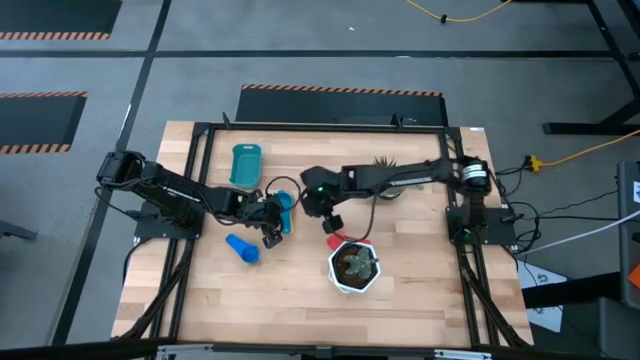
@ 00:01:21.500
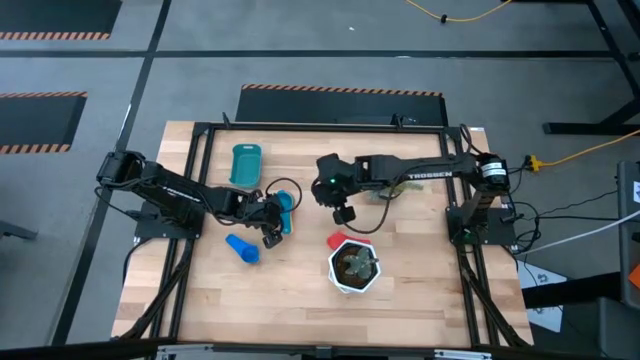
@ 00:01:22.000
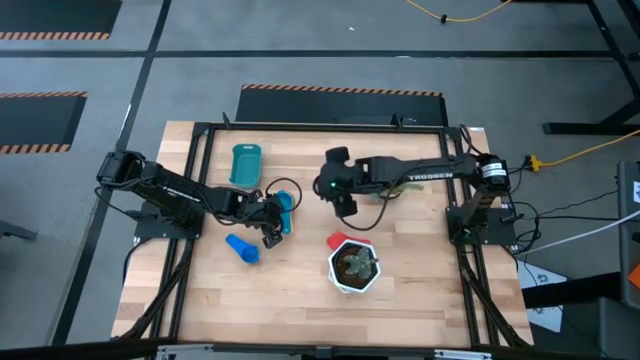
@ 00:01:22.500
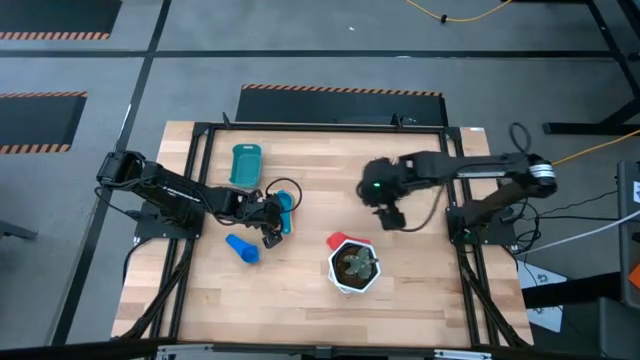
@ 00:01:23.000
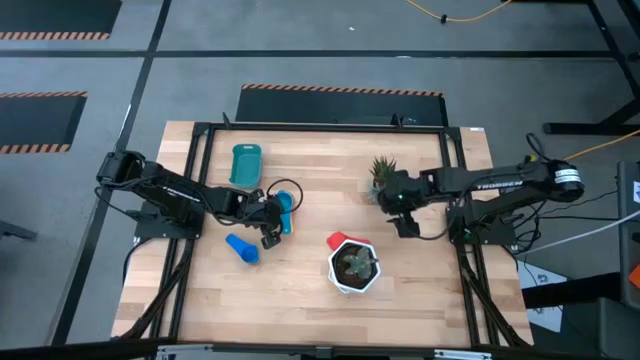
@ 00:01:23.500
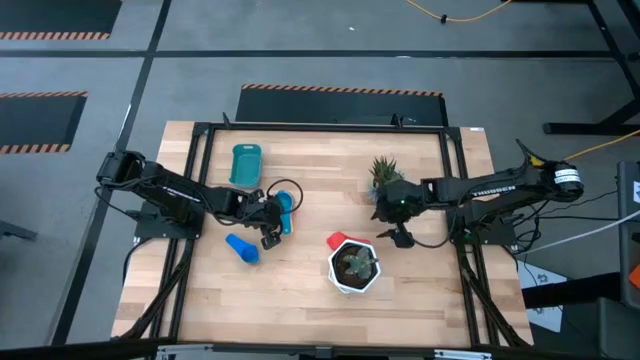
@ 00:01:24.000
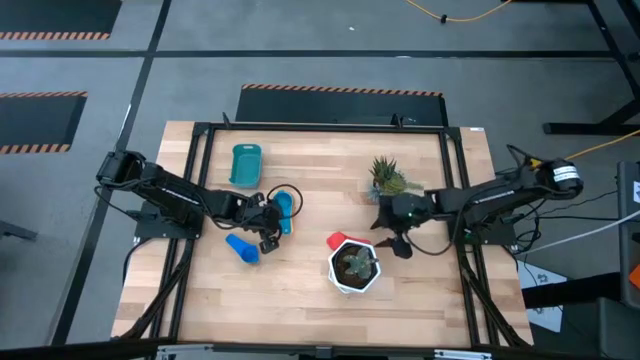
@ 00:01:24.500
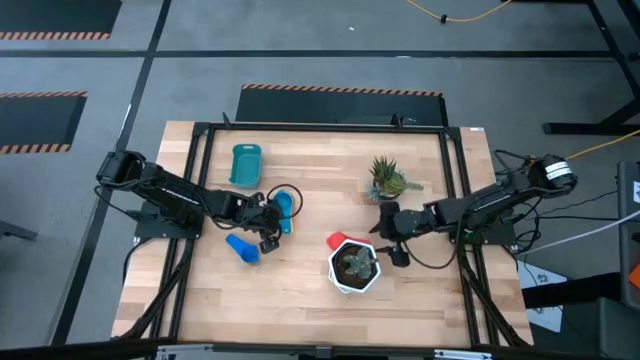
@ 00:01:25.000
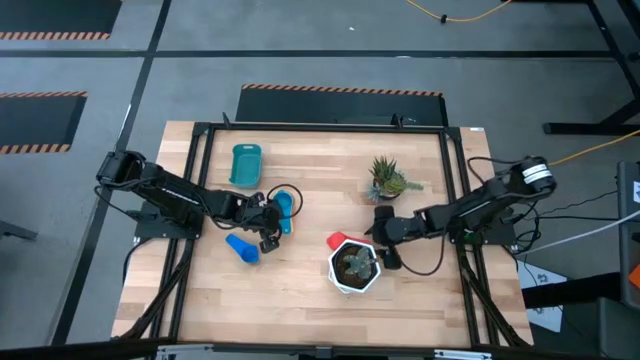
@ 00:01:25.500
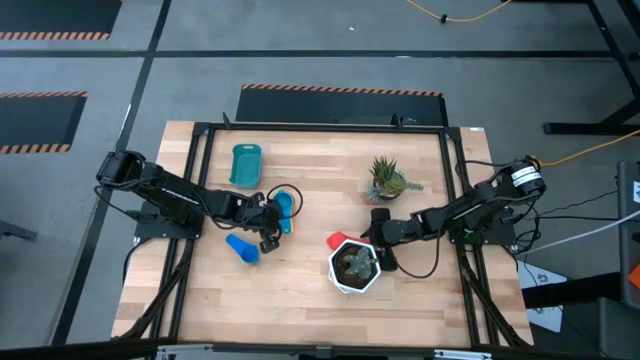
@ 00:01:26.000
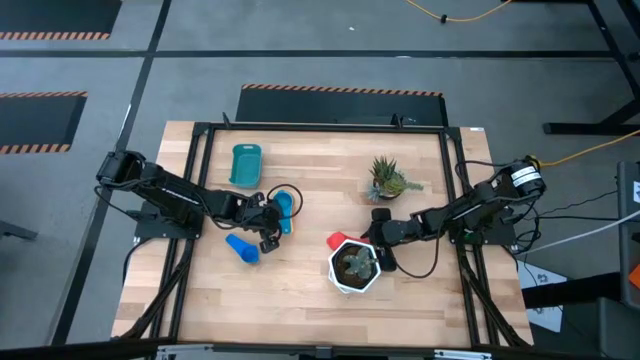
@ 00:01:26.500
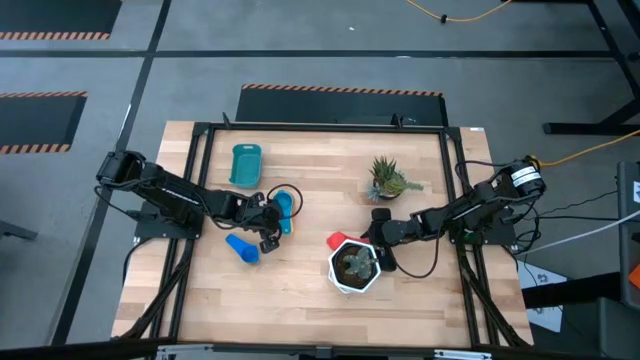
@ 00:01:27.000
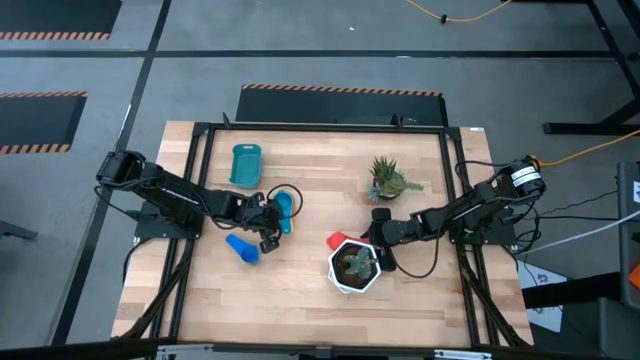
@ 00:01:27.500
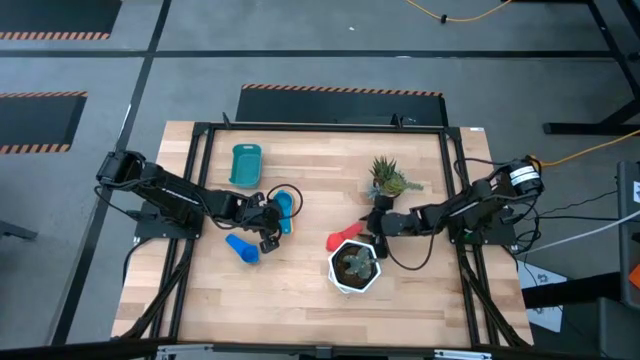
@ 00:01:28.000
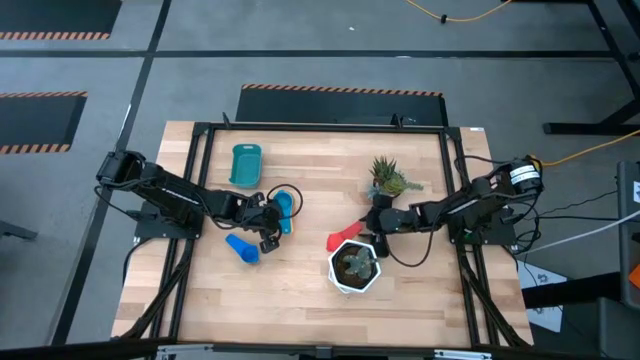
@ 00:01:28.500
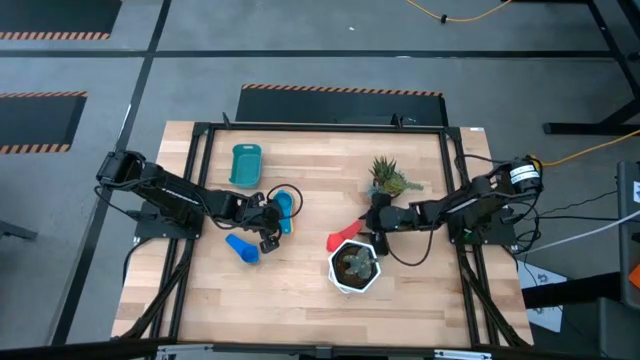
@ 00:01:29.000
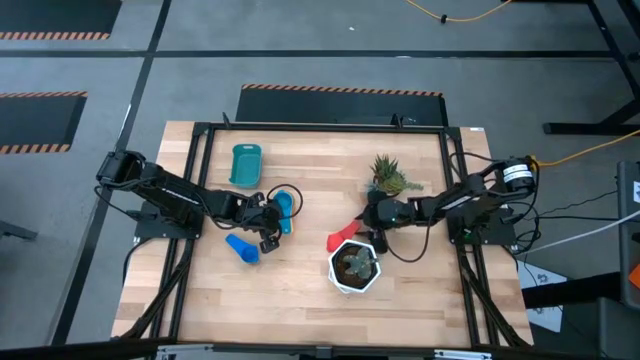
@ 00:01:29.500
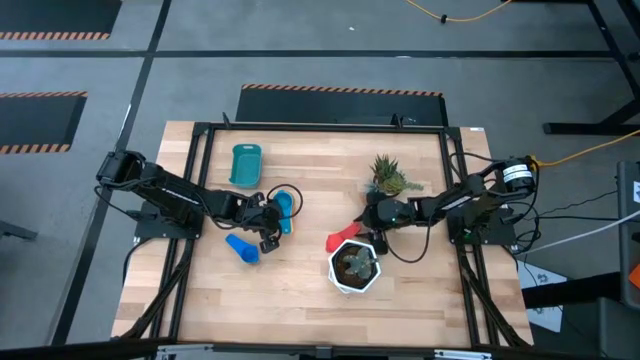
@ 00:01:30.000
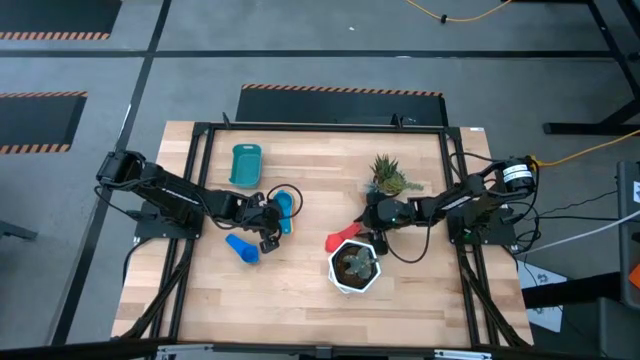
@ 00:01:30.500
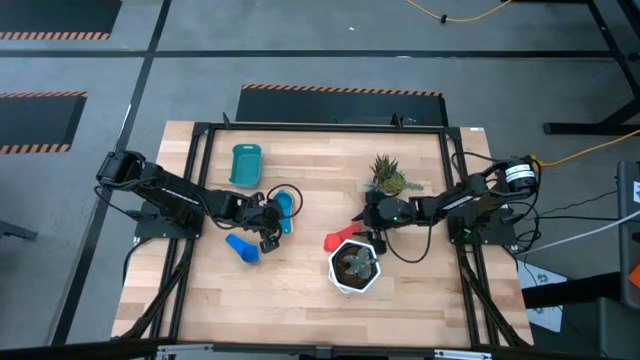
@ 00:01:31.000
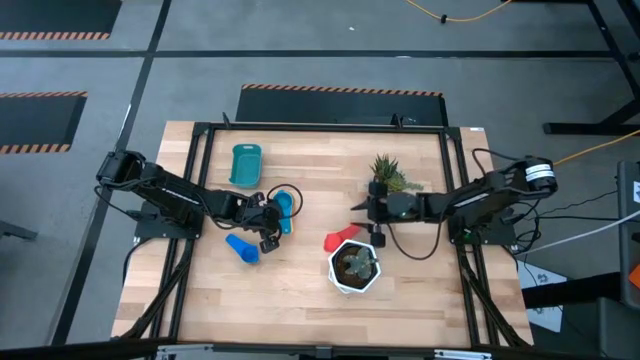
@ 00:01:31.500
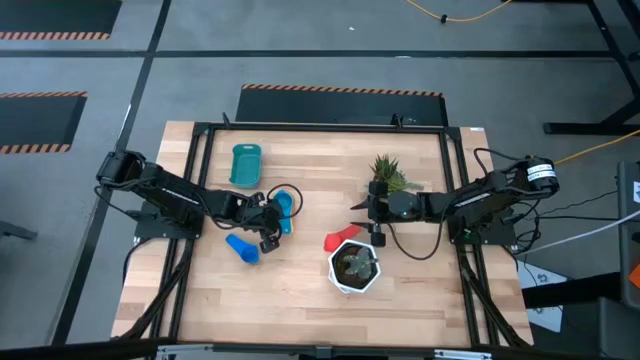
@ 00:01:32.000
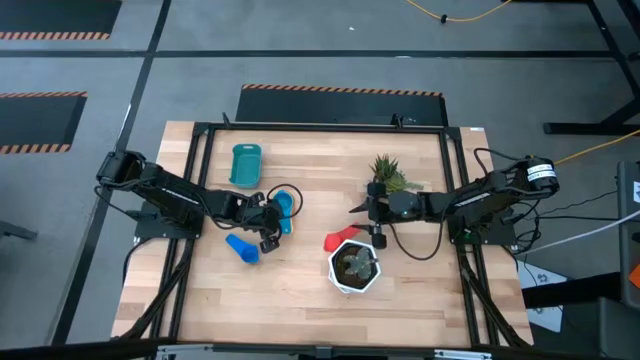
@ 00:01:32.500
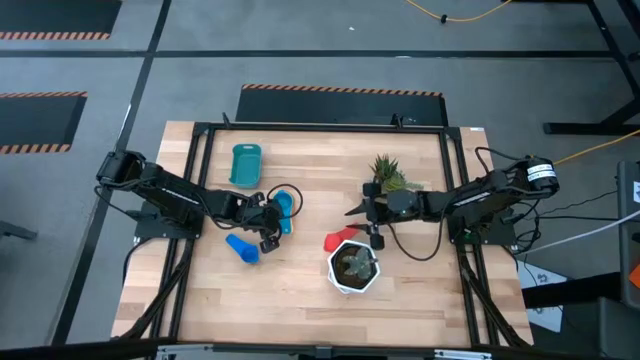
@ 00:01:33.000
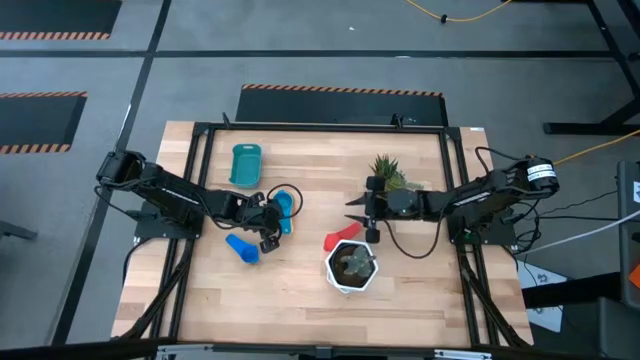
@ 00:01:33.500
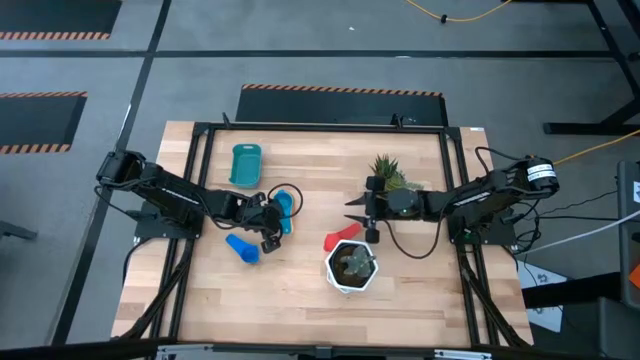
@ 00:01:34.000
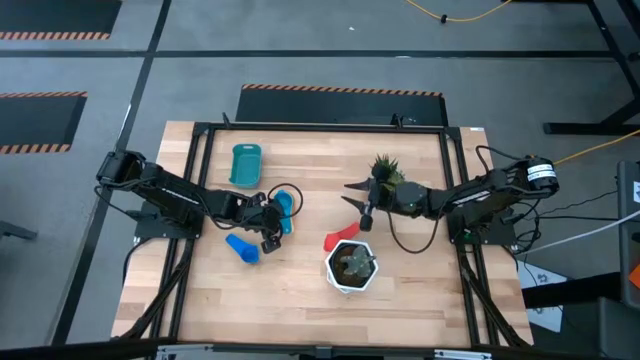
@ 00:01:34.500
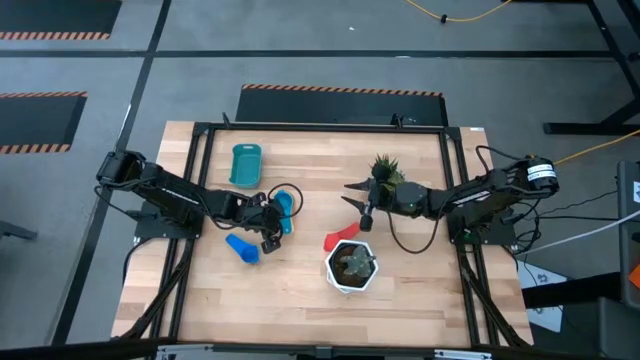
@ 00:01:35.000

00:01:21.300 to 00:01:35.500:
Task: Nest measuring cups in basket
Stack the red measuring cup into the light blue measuring cup
